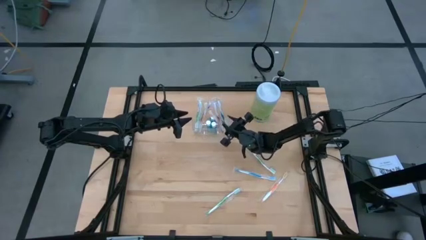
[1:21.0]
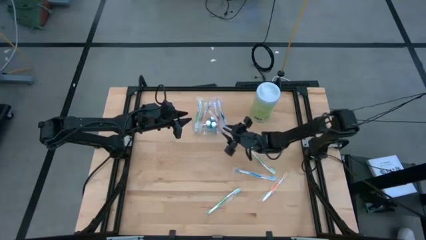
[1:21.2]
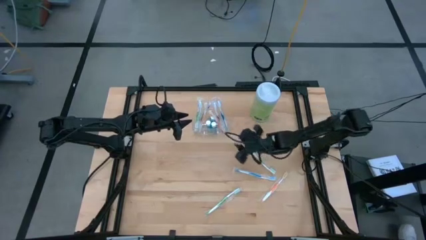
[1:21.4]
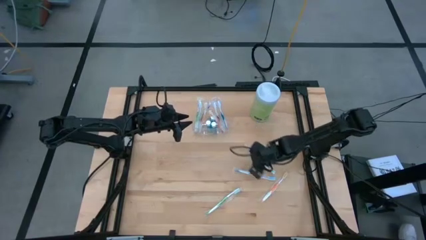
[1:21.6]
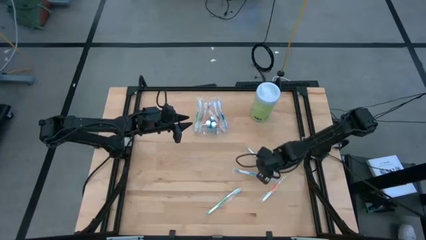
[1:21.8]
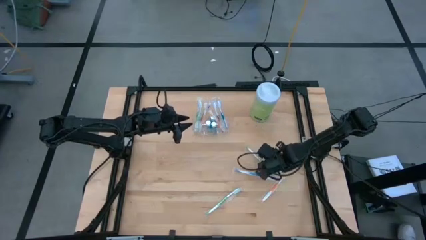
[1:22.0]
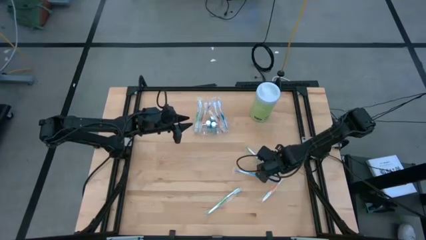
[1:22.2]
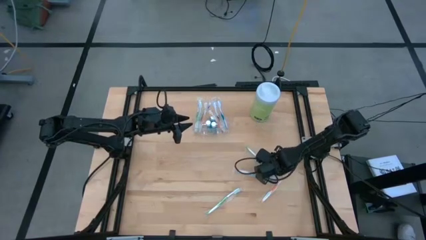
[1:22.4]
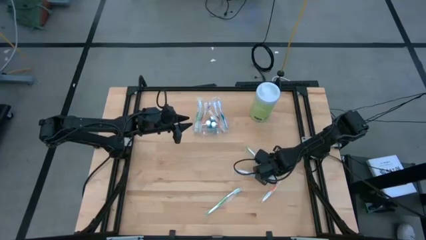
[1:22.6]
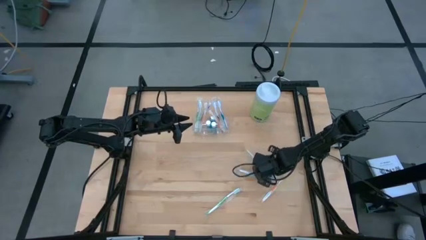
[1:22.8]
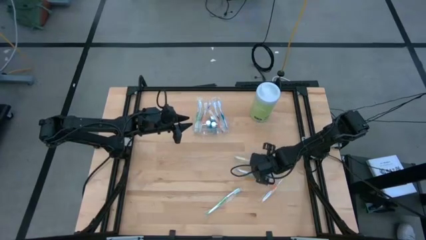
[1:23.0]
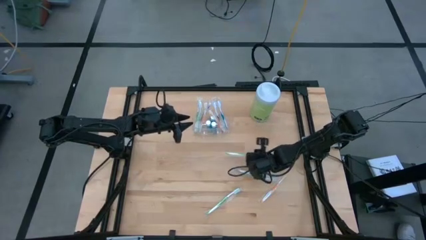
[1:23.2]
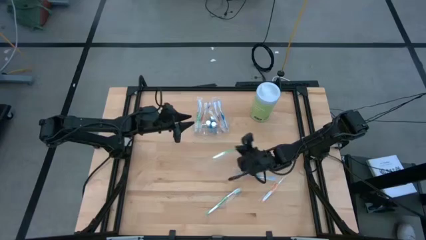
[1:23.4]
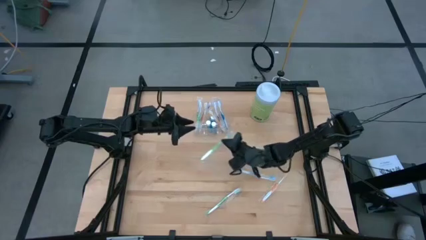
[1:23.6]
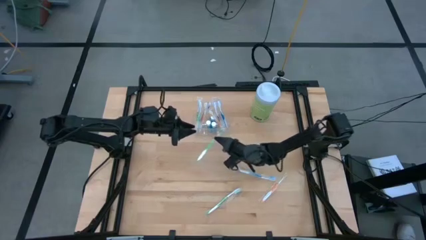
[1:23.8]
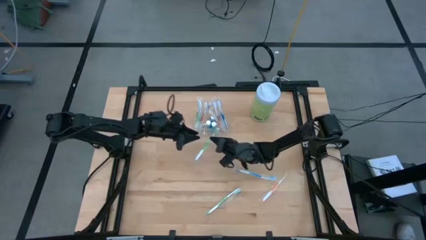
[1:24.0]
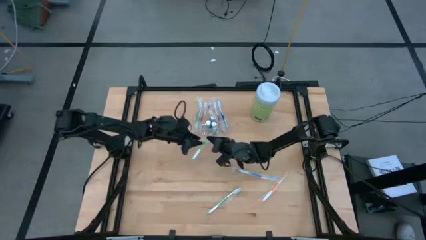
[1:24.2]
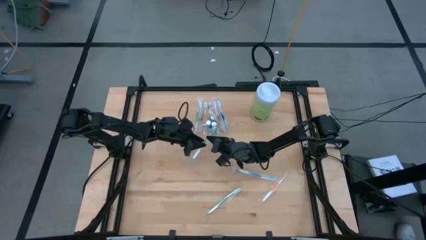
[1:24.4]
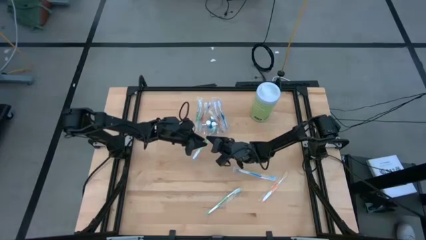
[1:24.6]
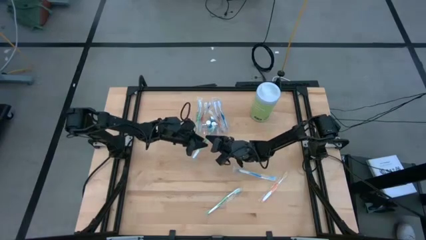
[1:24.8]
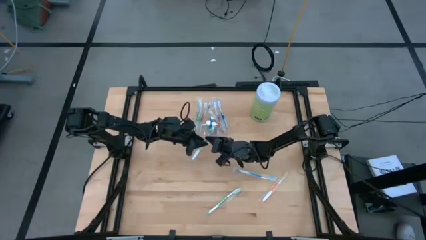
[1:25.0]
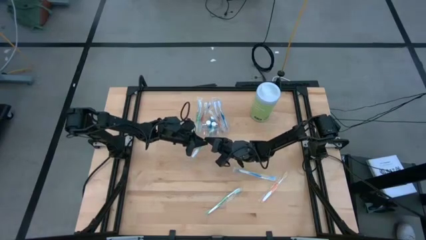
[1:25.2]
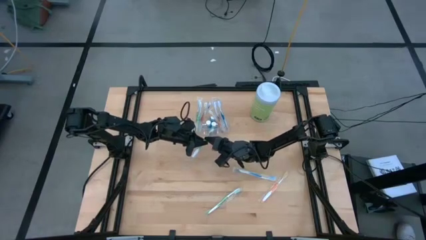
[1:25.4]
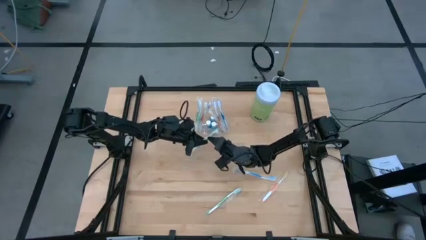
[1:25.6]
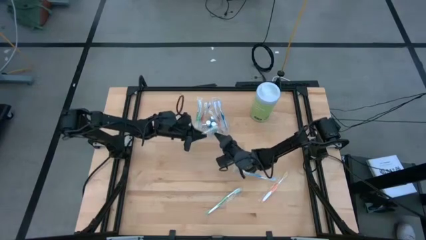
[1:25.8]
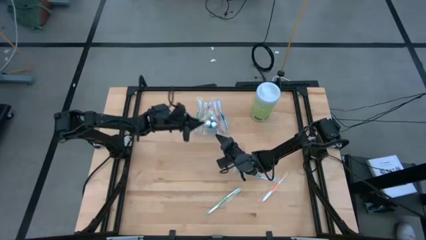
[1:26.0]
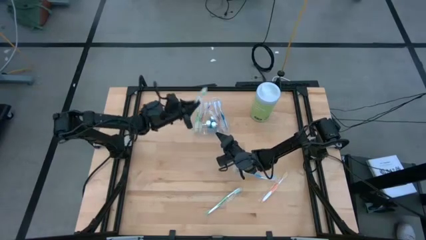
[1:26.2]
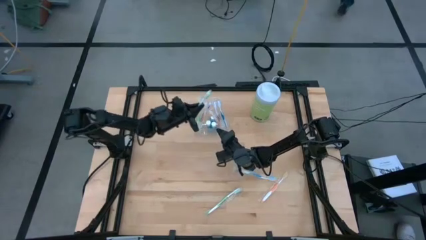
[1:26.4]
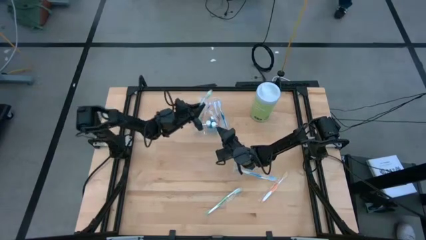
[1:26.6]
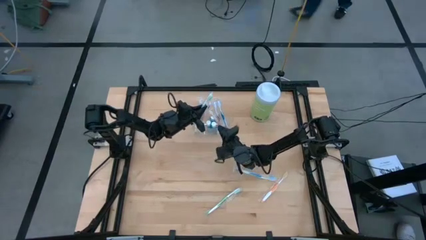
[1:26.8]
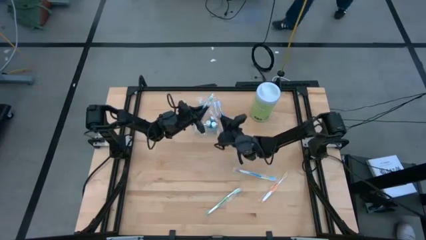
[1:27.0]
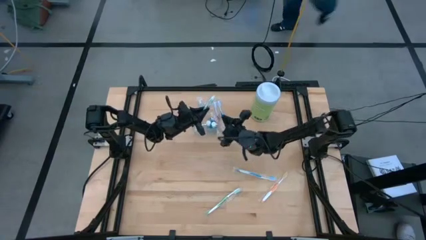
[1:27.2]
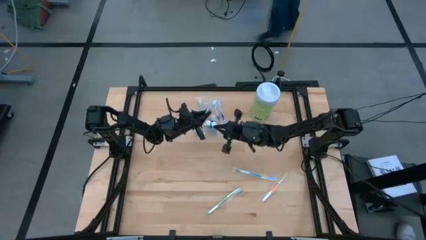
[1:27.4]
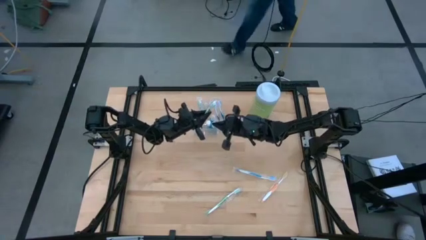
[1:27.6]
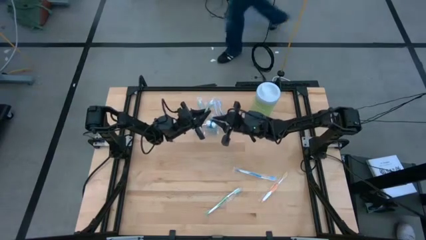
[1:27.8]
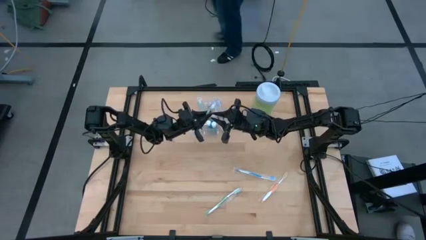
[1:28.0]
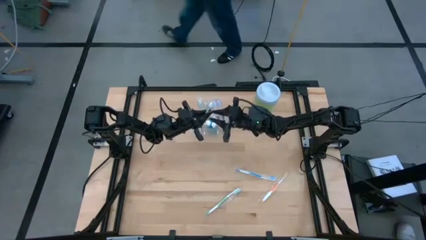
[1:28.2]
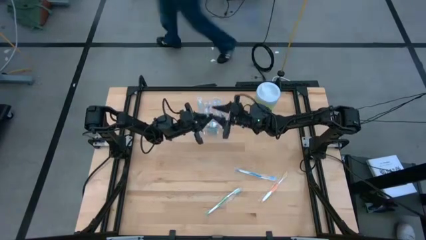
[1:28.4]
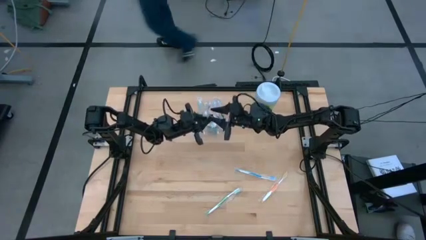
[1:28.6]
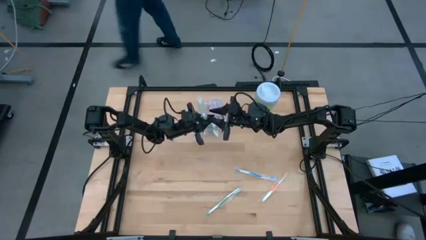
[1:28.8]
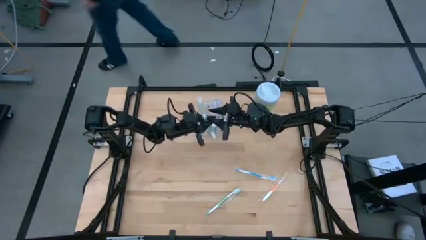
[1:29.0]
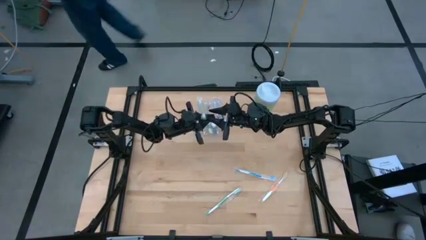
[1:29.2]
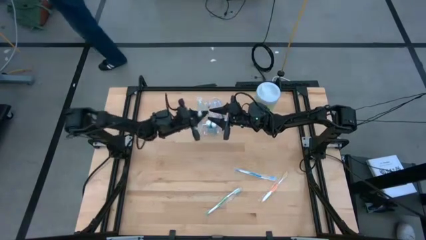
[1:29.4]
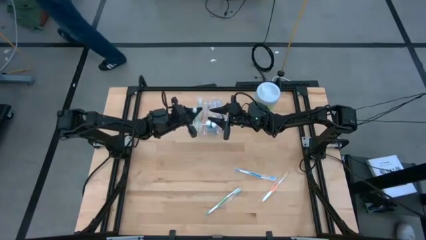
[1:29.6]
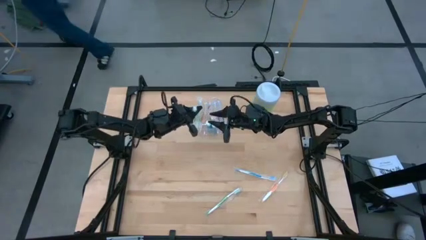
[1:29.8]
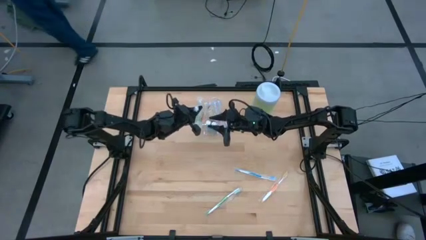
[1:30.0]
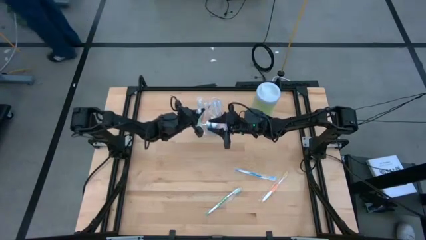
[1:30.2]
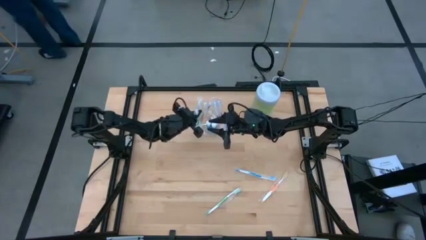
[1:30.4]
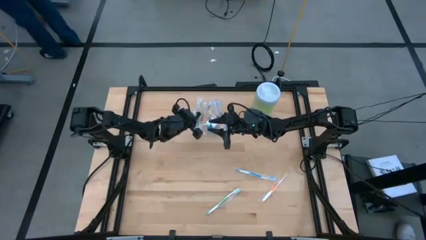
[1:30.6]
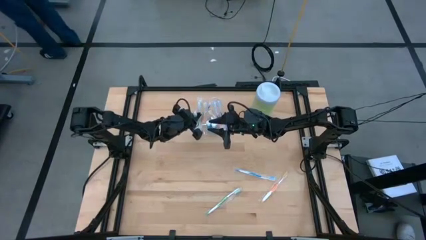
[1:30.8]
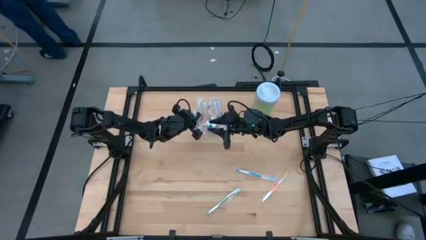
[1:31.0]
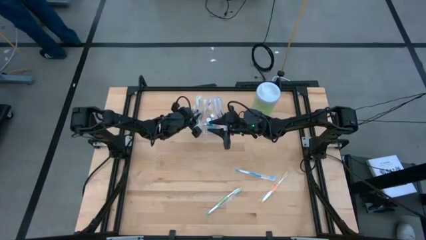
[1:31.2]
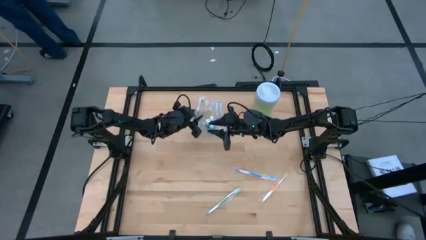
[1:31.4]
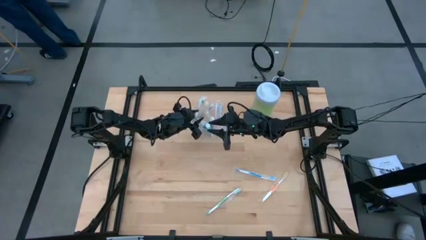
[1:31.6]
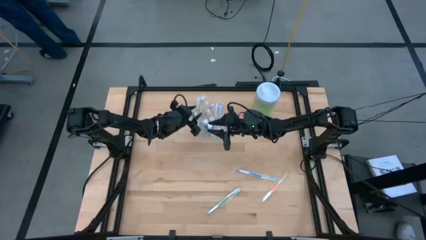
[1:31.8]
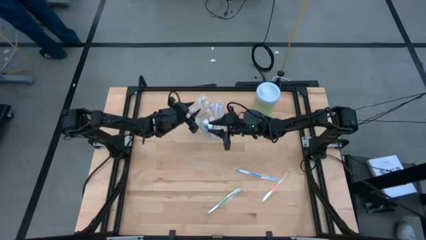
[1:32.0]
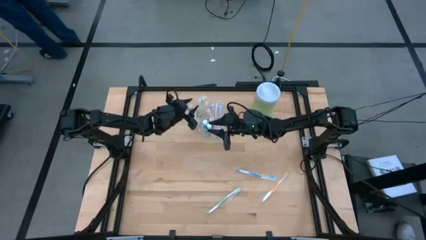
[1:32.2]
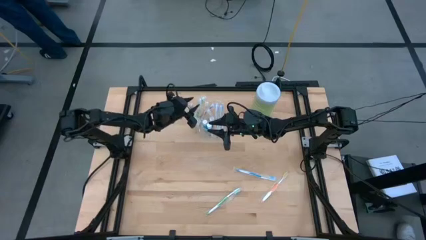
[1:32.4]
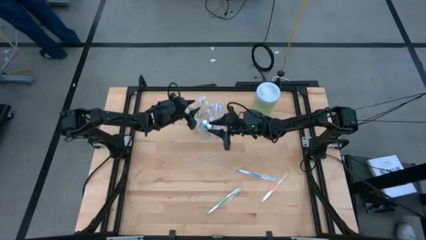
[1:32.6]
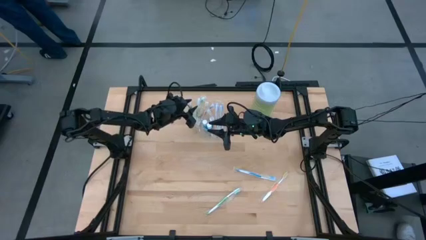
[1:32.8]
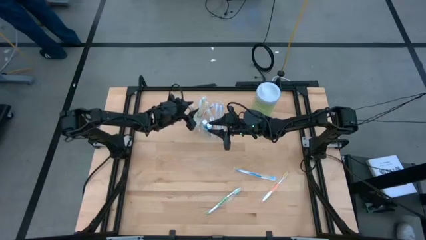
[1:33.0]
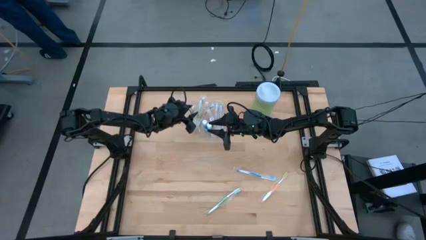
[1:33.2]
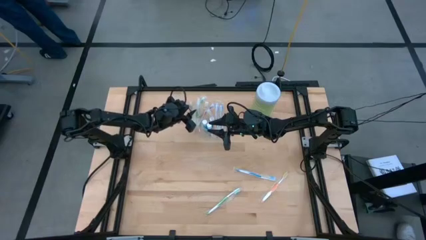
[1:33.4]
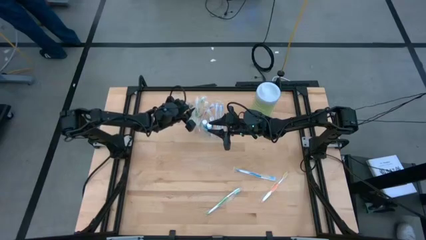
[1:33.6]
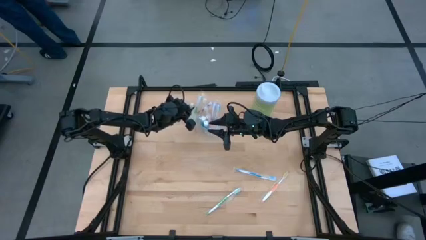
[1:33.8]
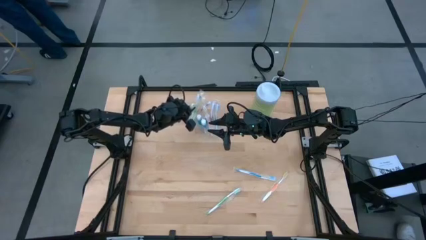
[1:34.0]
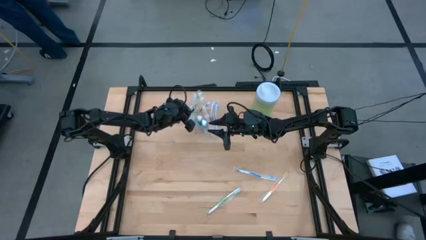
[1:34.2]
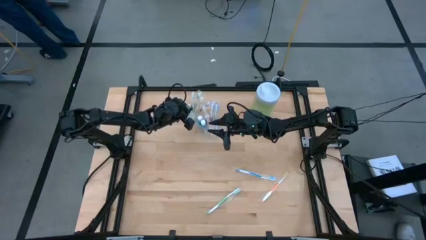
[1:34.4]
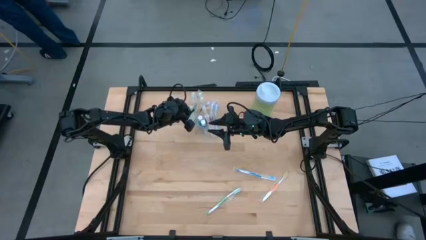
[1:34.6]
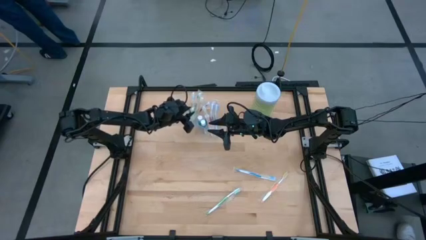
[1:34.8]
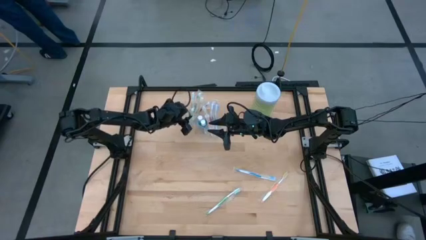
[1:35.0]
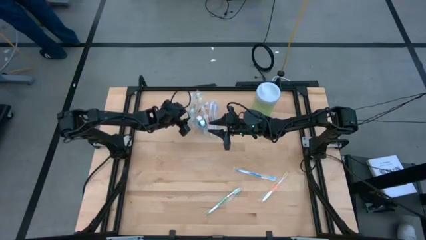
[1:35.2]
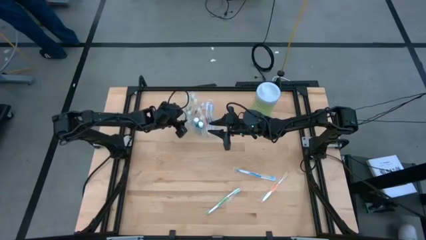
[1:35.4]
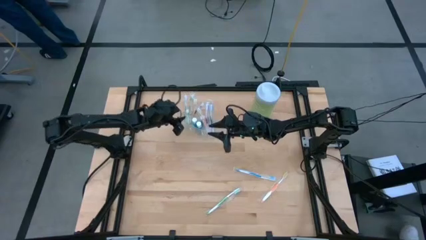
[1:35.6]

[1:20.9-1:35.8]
Task: Pick & Place toothbrushing station
Put the green toothbrush into the transparent organizer

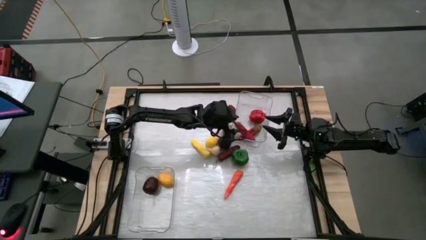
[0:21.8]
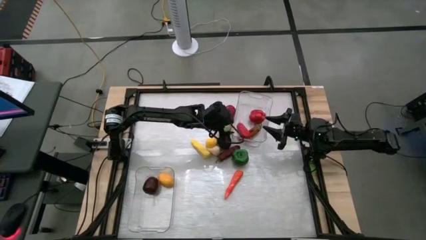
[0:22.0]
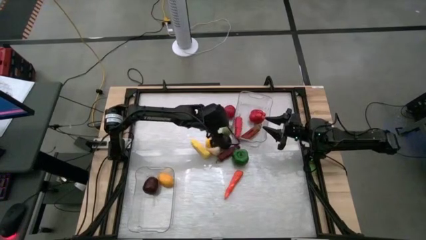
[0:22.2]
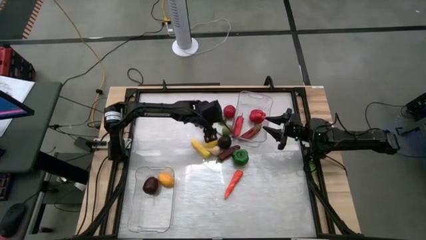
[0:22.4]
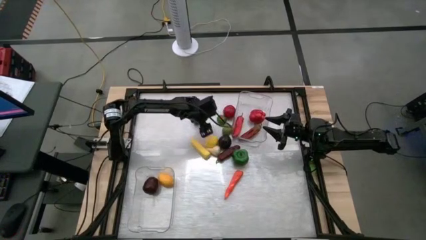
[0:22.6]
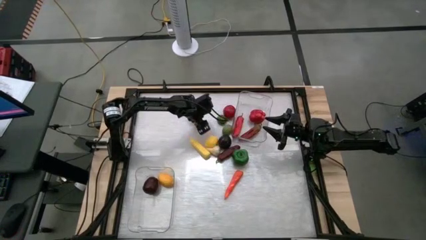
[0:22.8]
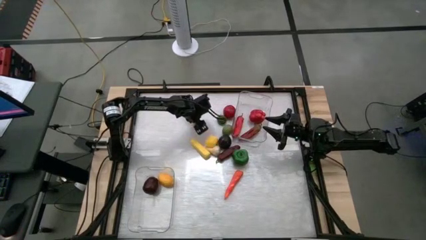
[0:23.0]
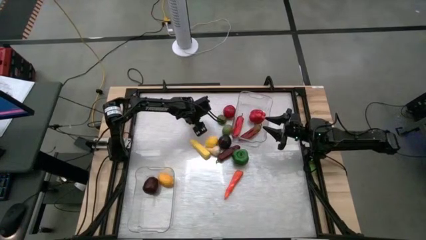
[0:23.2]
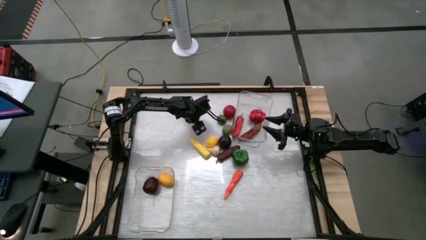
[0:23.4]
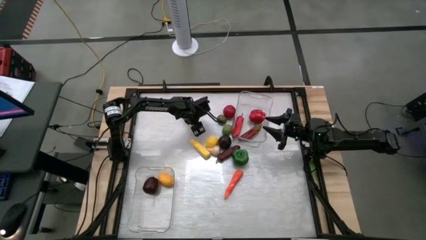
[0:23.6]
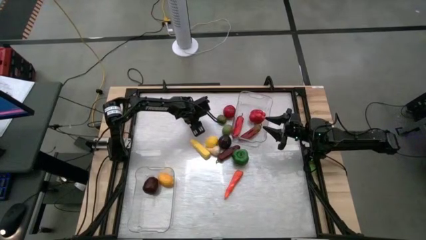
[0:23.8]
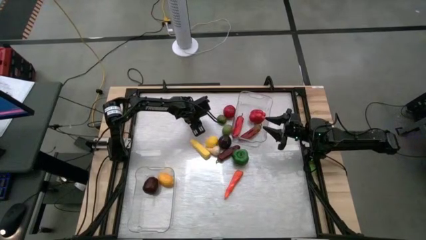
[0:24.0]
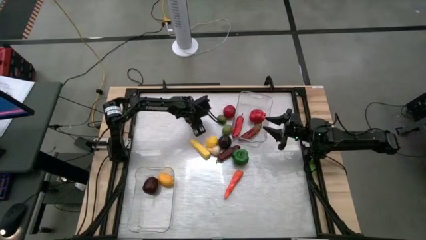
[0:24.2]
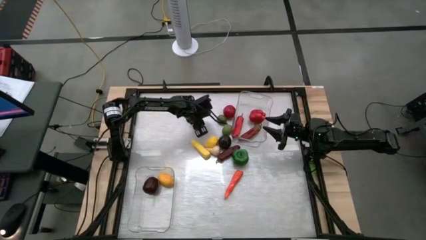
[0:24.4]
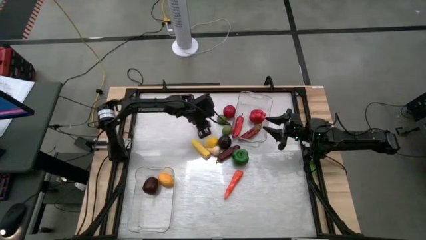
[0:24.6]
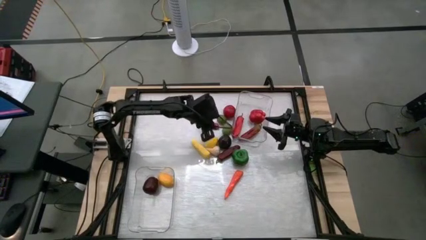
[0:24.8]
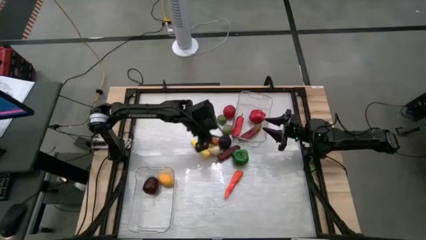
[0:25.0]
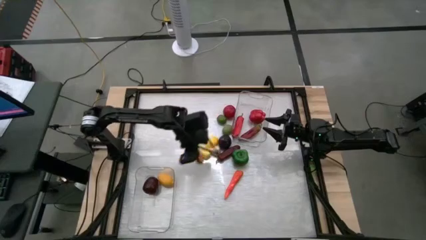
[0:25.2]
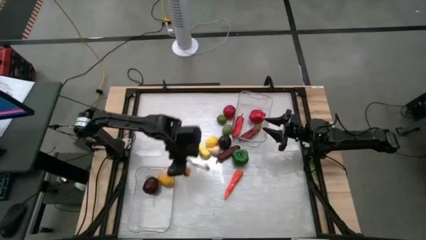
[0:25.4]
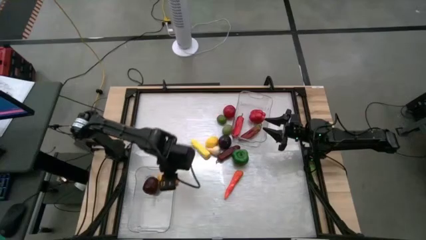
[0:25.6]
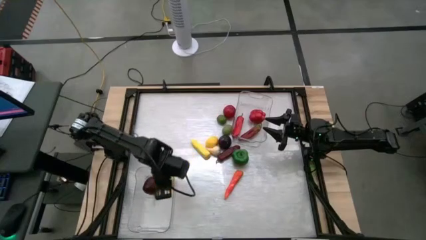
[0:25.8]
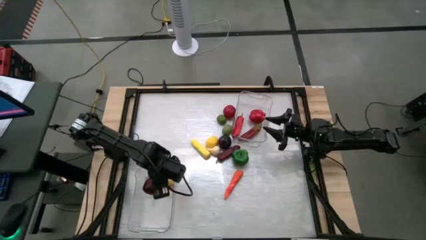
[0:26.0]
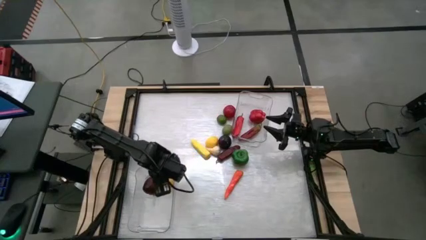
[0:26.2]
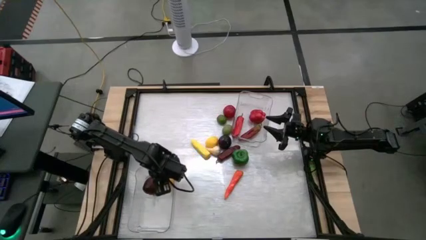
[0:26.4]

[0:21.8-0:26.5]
Task: Sort produce into baskets
Put the orange peach into the bottom transparent bin
